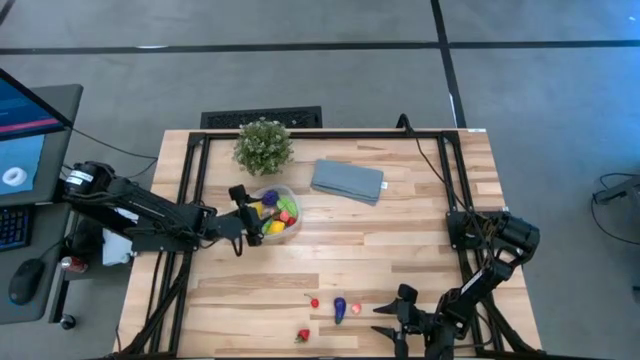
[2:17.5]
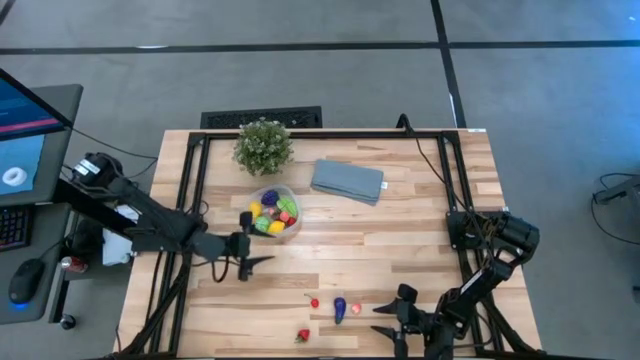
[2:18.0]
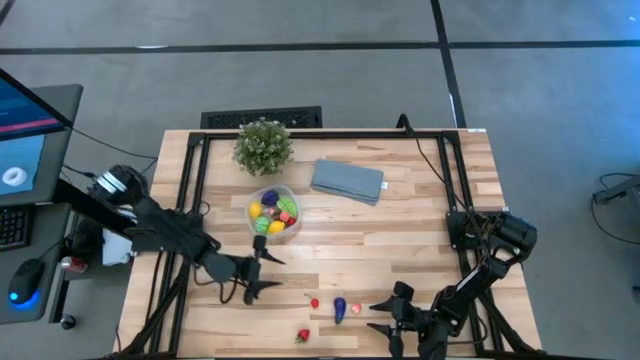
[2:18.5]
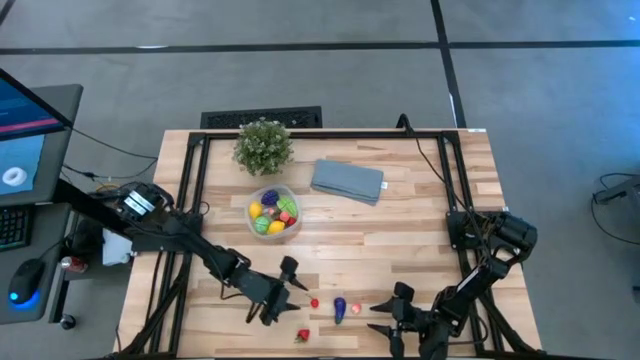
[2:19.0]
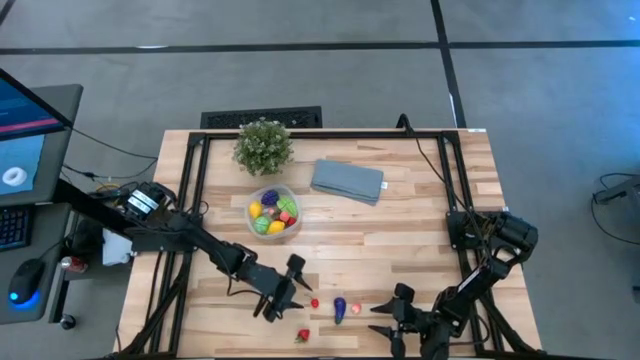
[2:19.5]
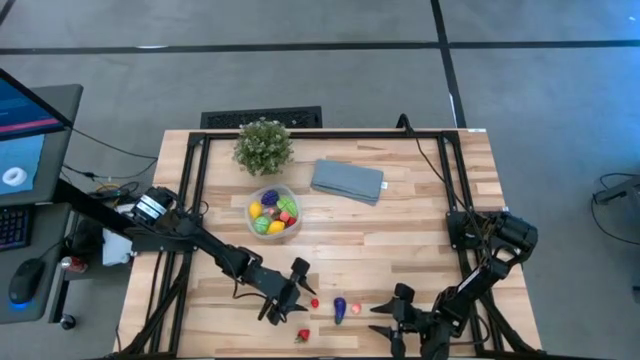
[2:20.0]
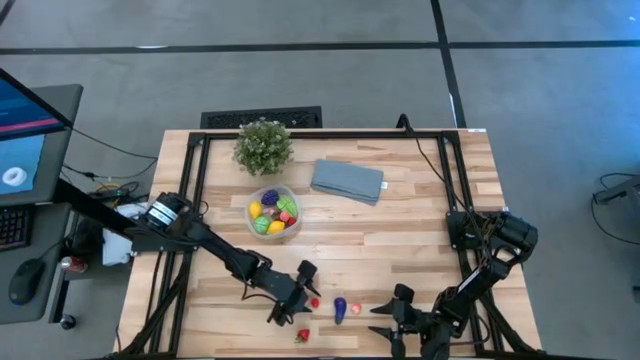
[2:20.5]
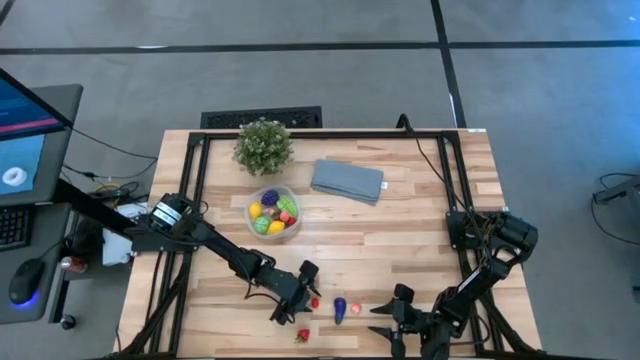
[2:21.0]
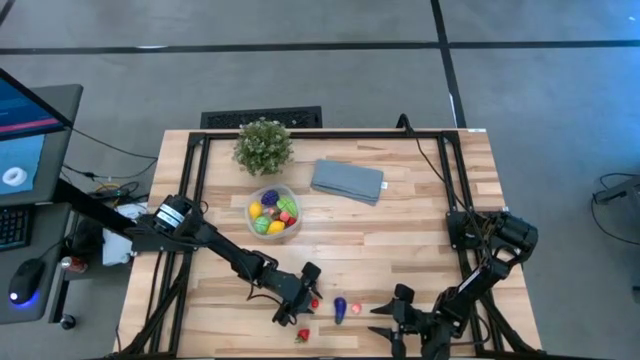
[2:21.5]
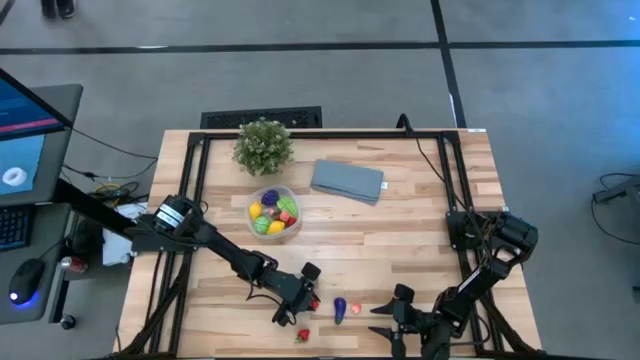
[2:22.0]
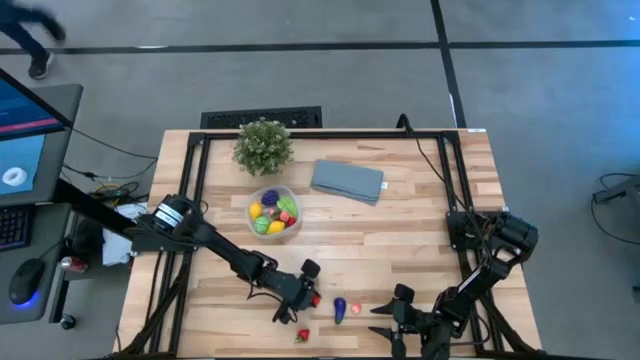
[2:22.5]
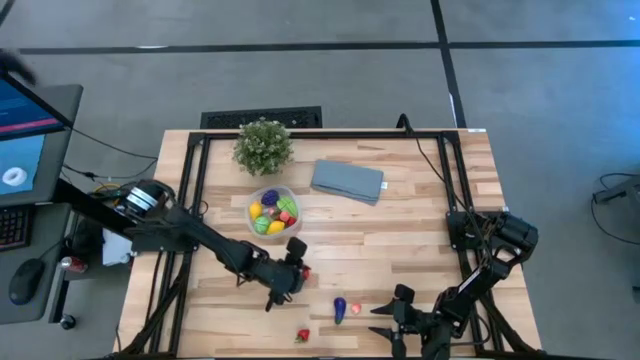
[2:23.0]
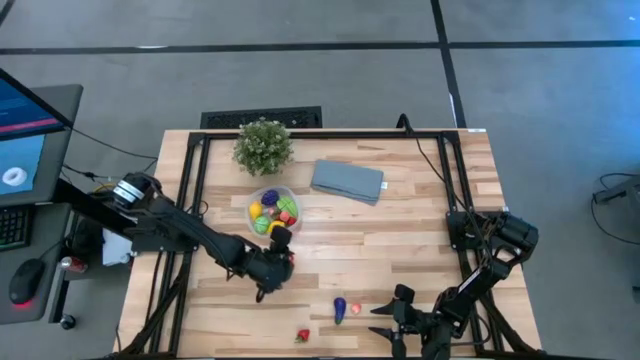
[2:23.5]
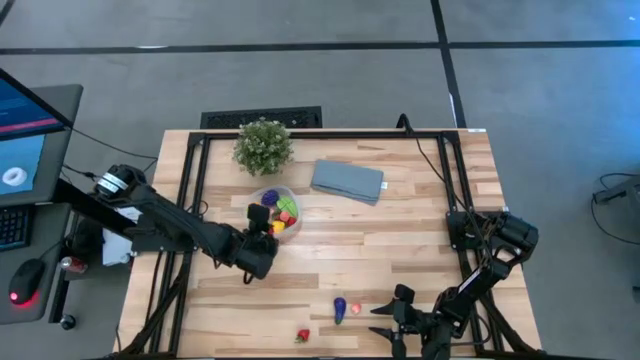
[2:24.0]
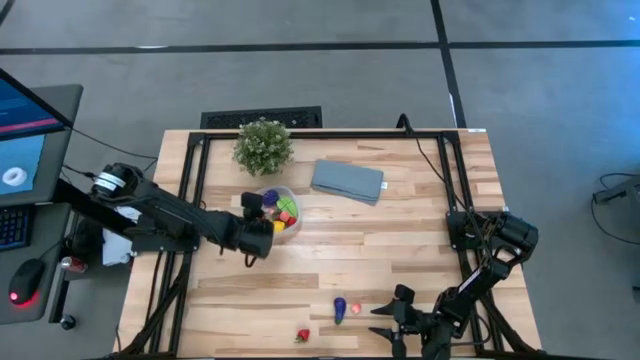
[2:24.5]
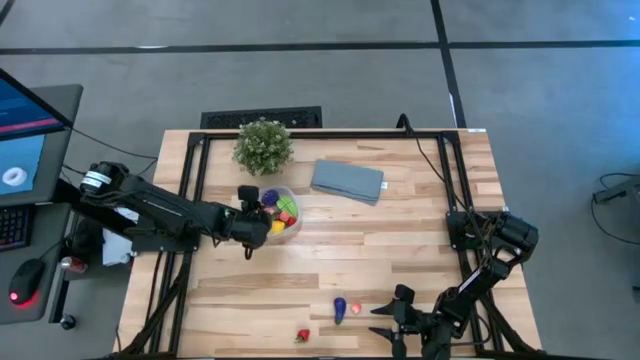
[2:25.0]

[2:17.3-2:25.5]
Task: Pick and placing Produce into tupperware
Put the red cherry into the transparent bin

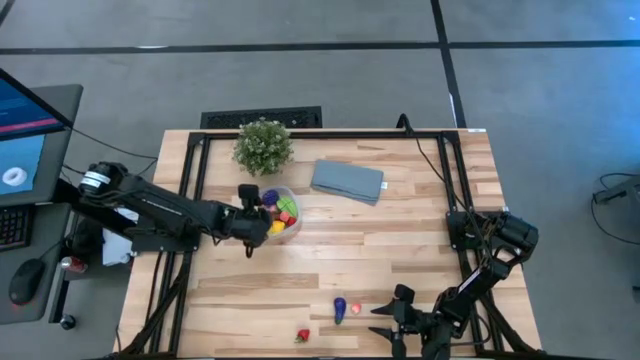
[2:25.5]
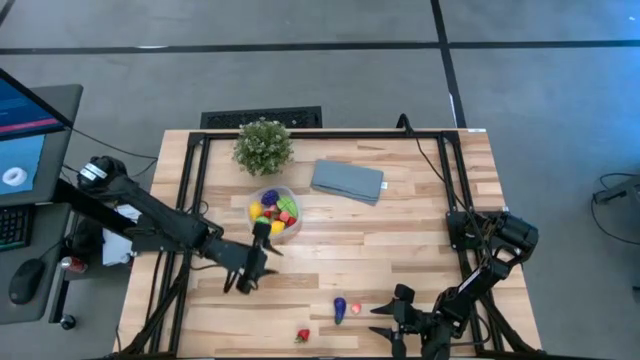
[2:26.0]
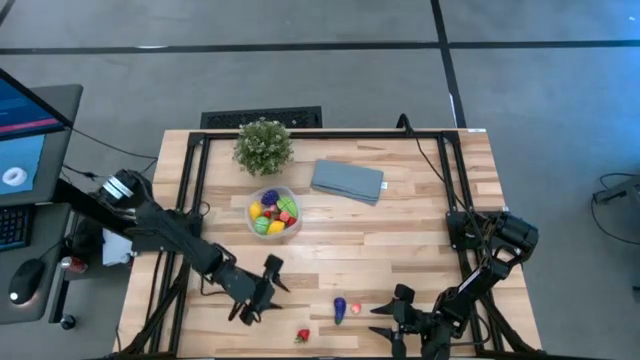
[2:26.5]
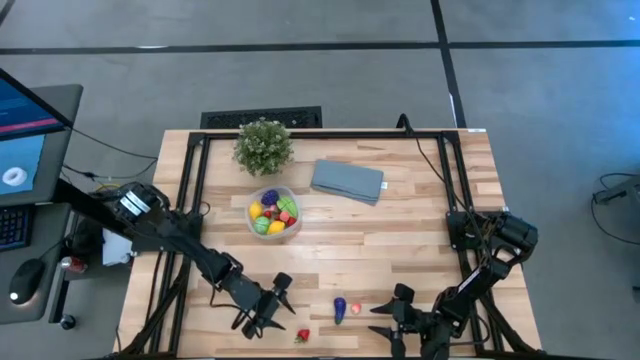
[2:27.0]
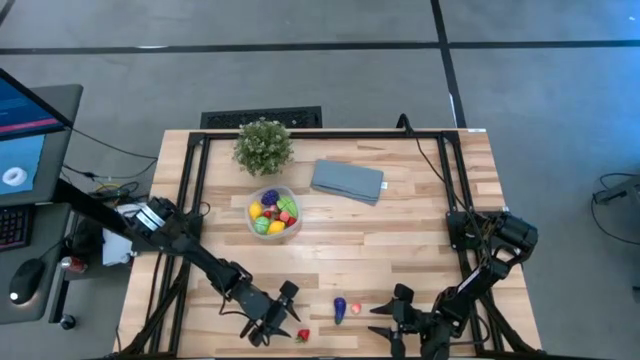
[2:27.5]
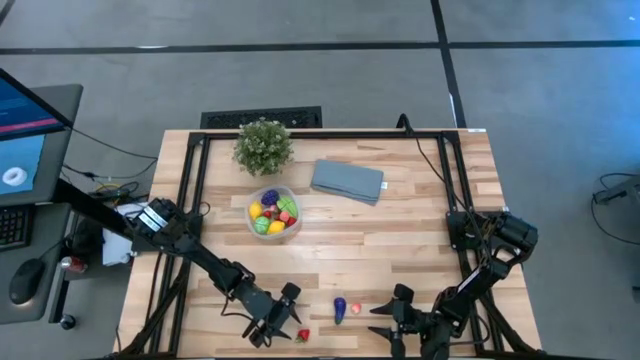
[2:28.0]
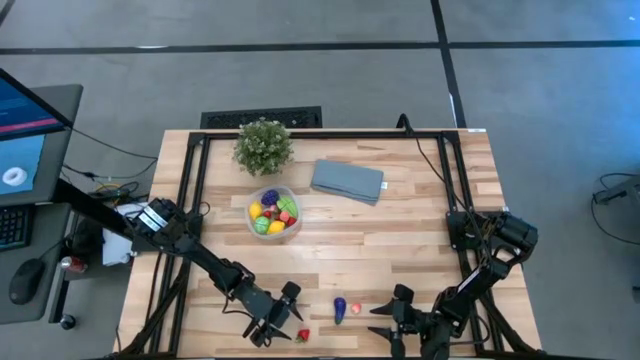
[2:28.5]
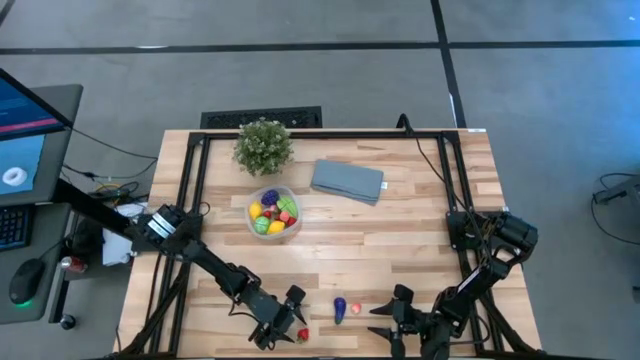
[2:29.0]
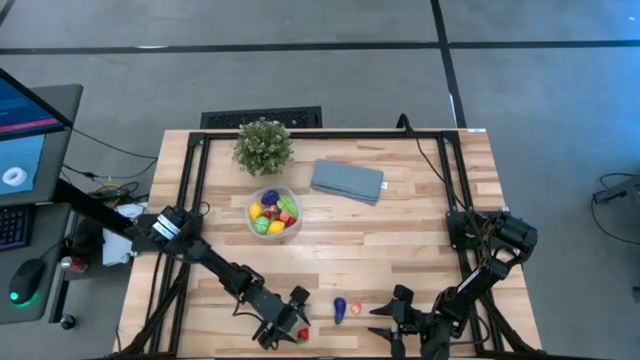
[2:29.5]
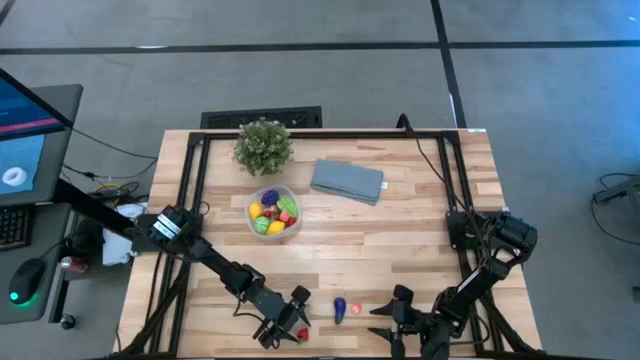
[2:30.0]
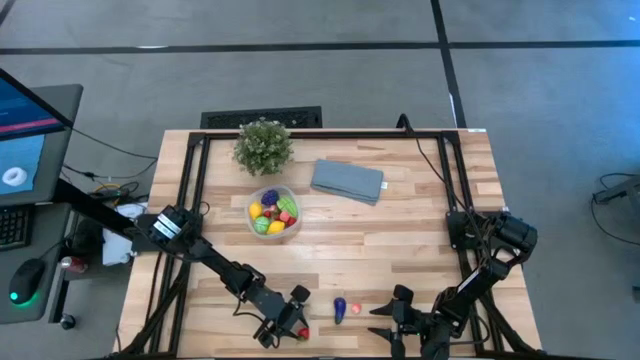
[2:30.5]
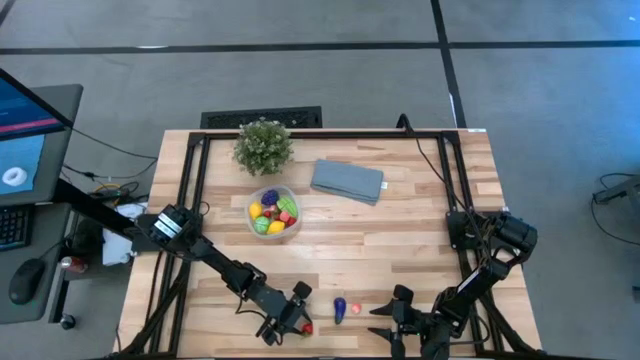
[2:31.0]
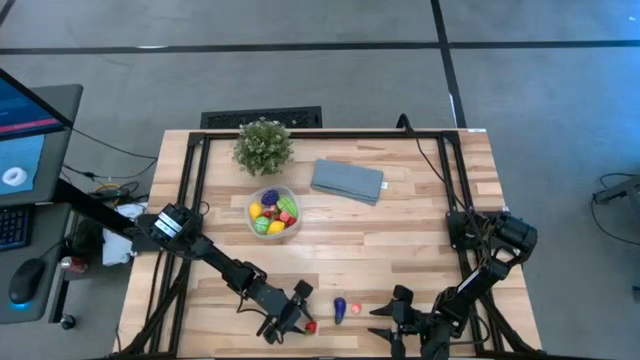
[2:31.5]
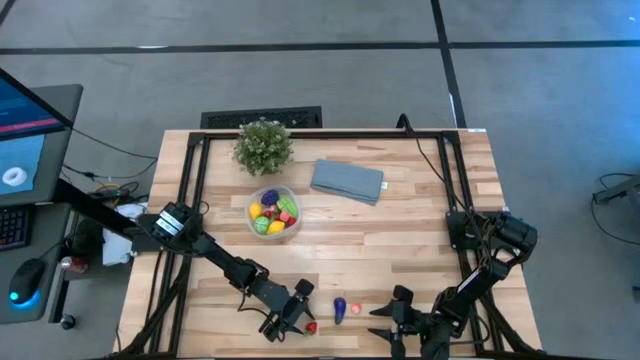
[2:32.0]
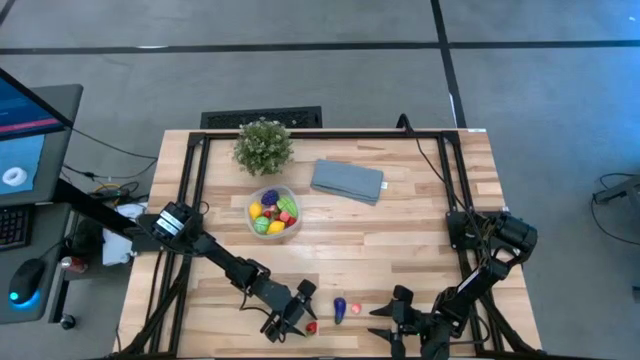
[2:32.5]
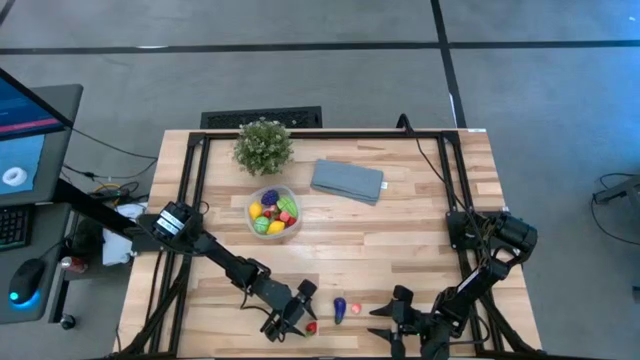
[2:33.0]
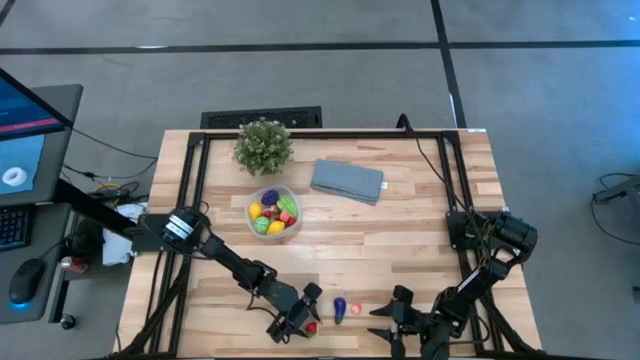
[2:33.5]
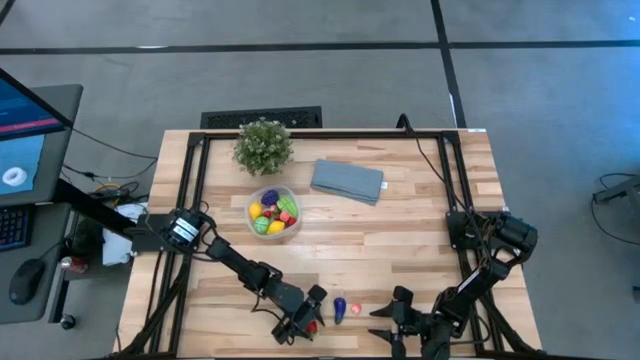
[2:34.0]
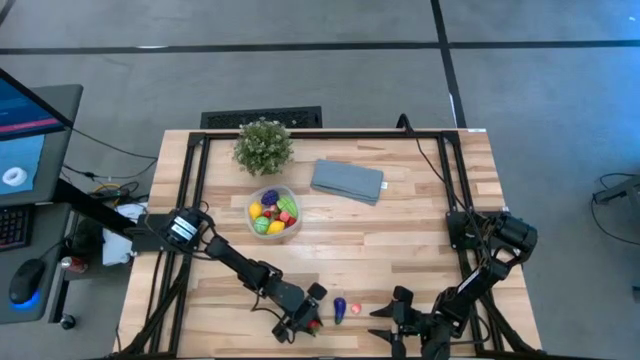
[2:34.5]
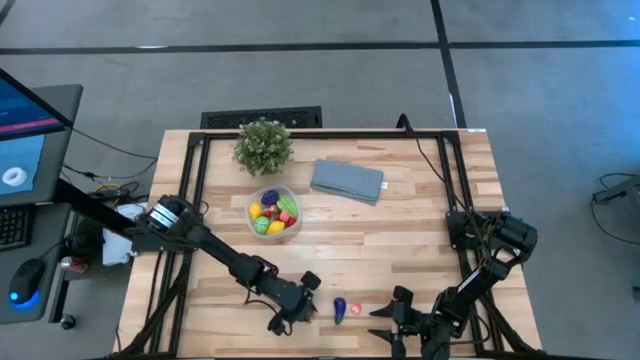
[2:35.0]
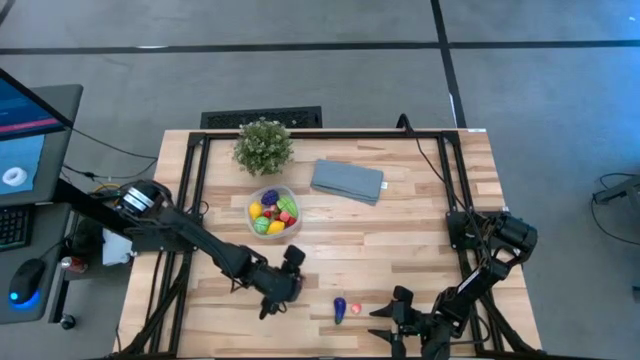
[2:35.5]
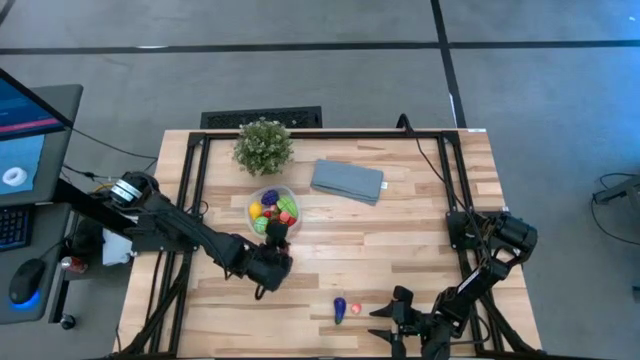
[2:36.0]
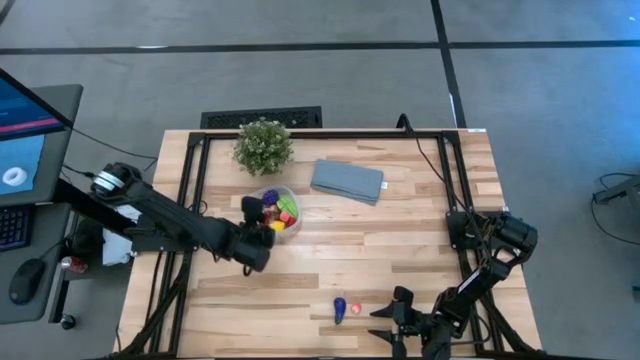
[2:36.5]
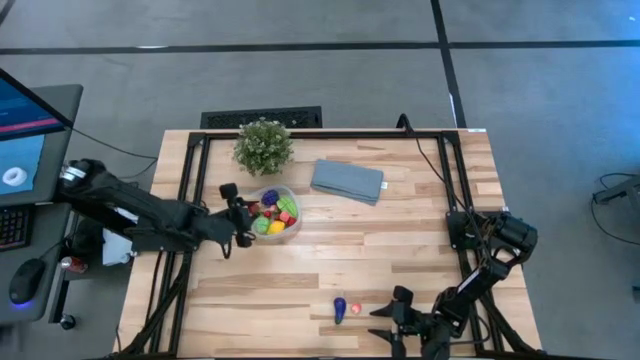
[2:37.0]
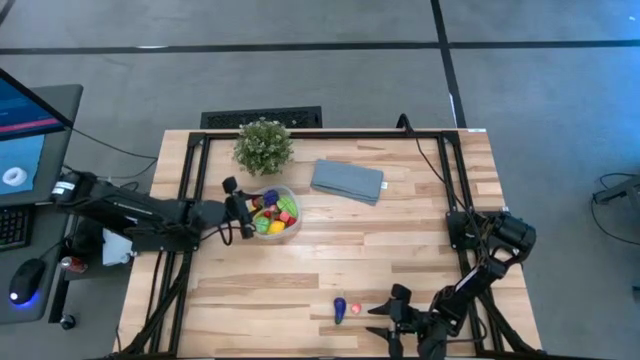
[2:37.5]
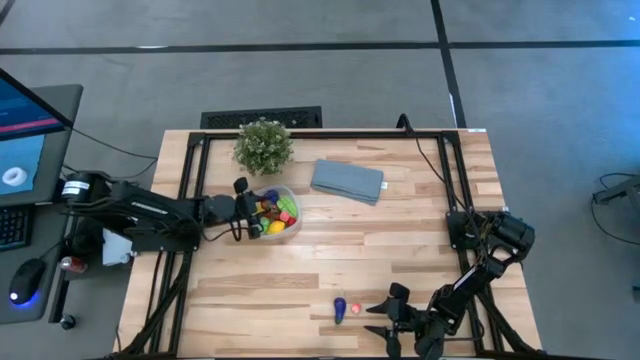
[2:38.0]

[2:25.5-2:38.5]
Put the strawberry into the transparent bin

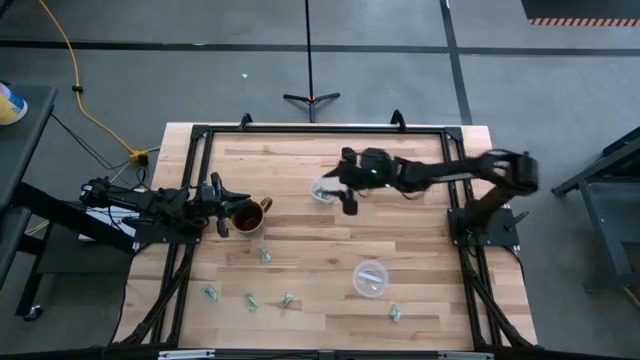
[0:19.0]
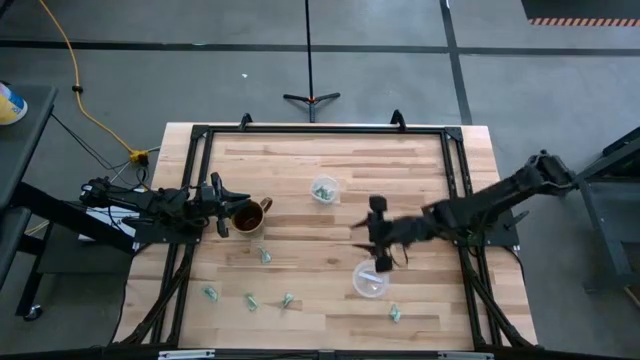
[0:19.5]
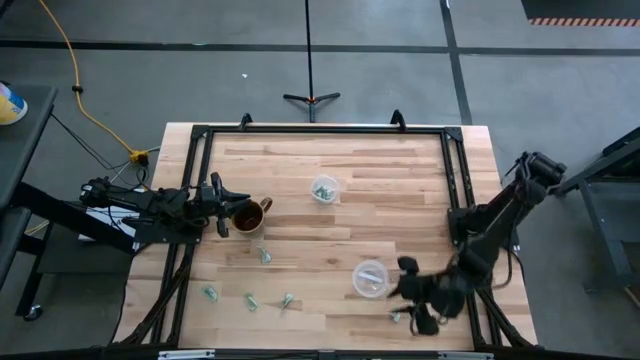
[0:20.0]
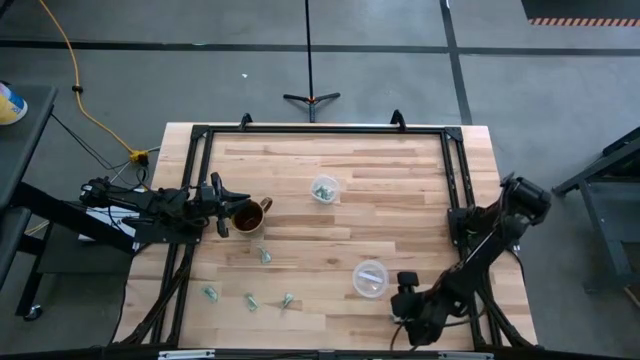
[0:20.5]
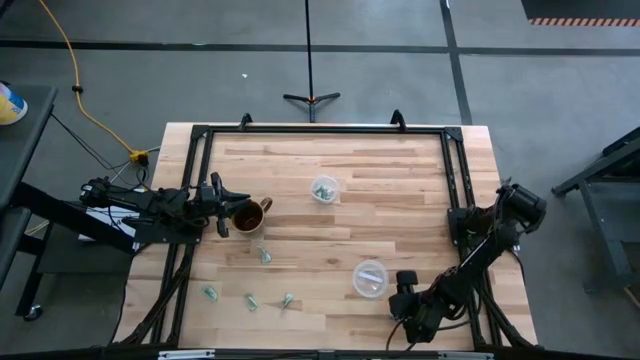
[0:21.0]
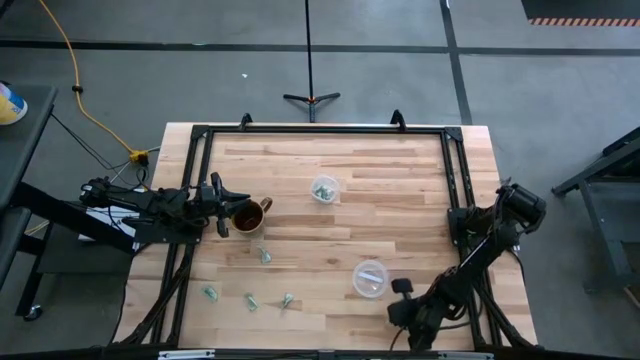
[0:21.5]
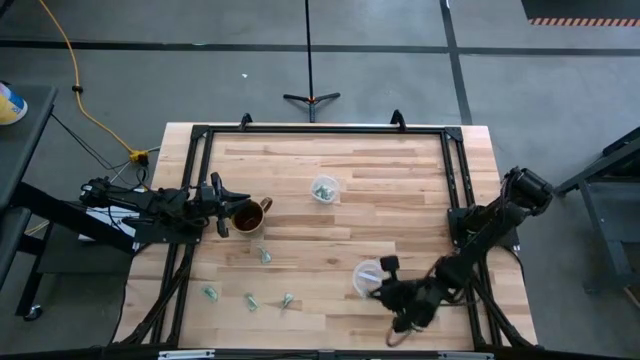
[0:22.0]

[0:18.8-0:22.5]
Task: Pick and place Stevia / Truvia into bins
Put the stevia packet into the bottom transparent container
